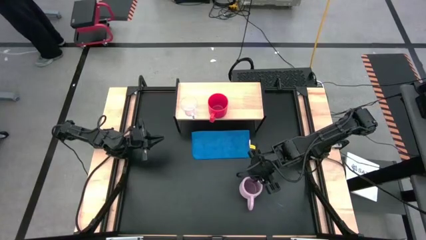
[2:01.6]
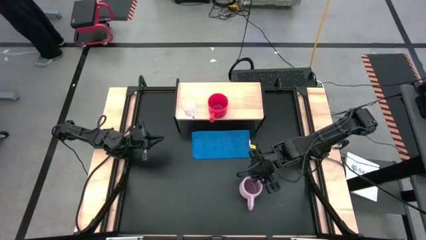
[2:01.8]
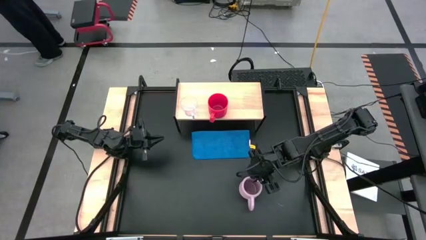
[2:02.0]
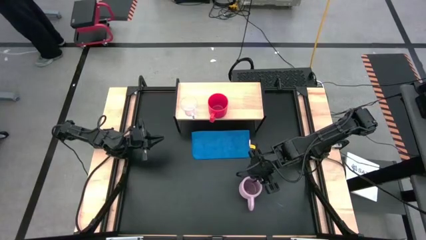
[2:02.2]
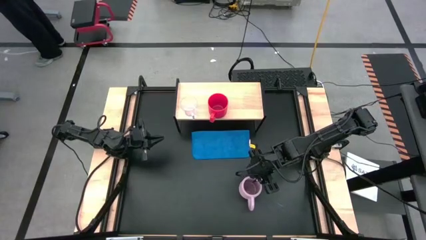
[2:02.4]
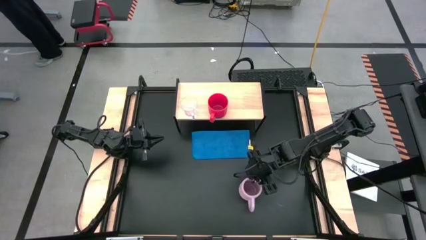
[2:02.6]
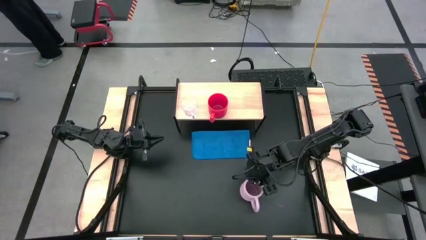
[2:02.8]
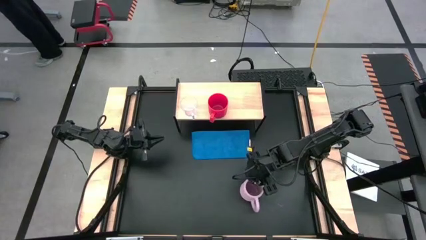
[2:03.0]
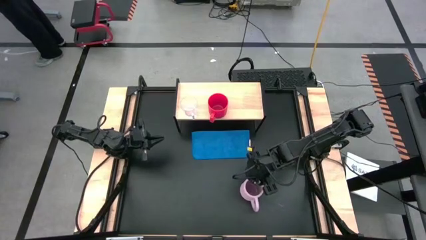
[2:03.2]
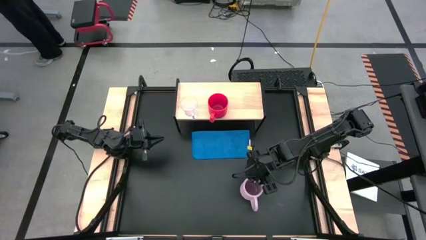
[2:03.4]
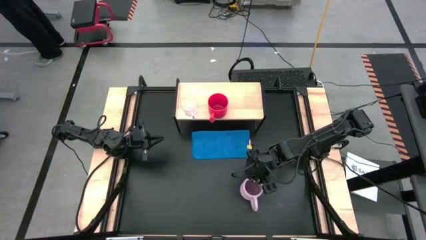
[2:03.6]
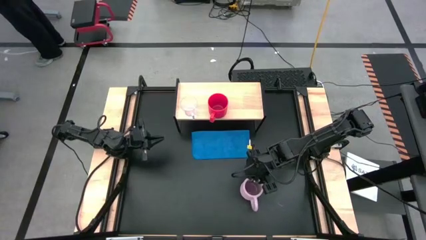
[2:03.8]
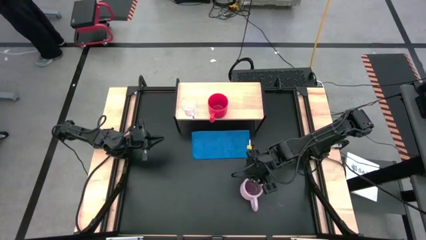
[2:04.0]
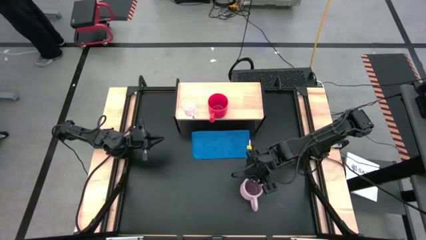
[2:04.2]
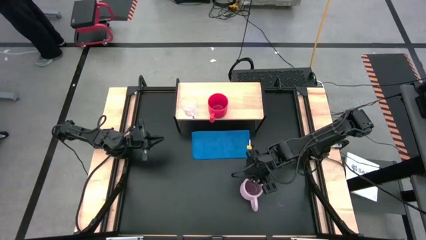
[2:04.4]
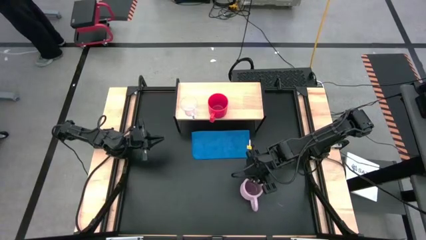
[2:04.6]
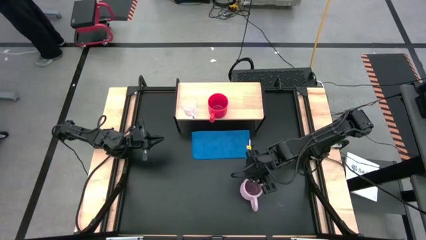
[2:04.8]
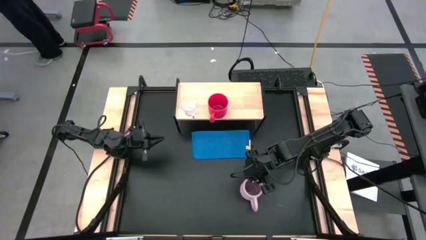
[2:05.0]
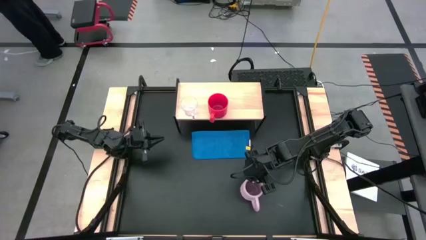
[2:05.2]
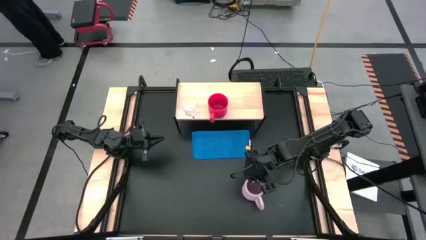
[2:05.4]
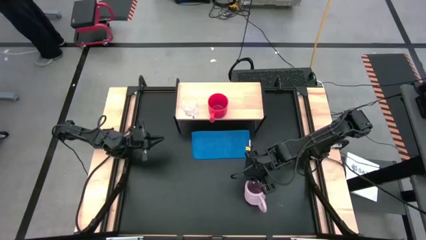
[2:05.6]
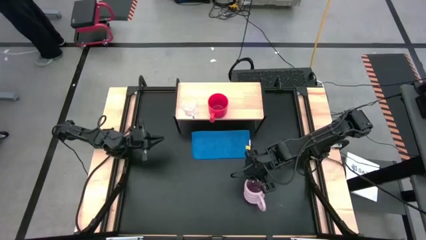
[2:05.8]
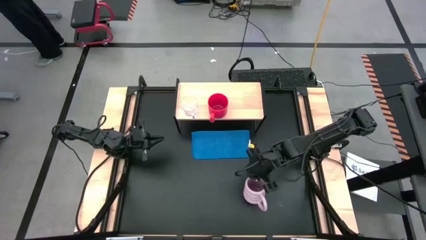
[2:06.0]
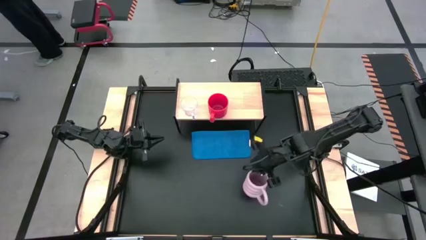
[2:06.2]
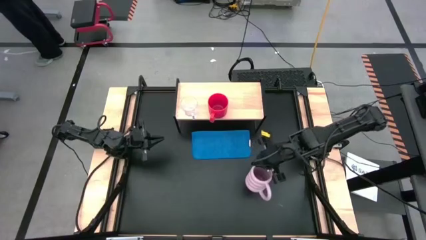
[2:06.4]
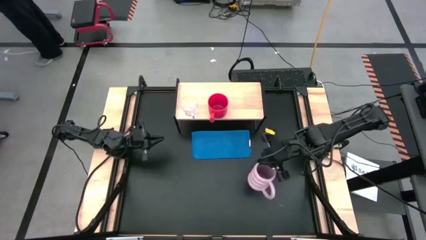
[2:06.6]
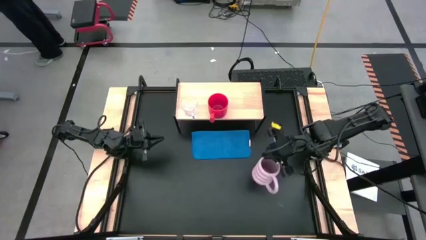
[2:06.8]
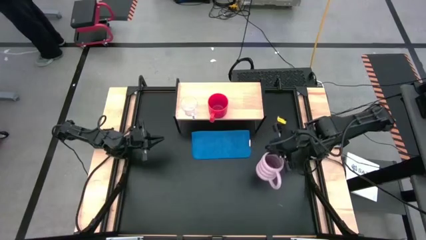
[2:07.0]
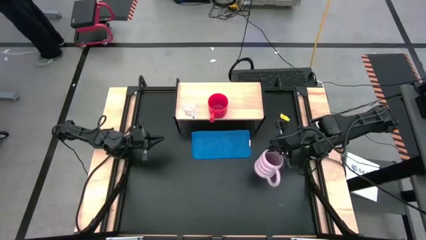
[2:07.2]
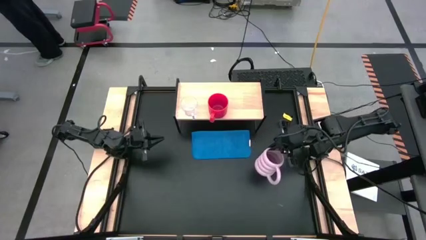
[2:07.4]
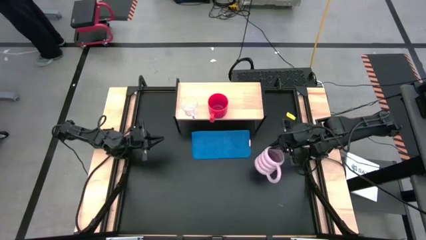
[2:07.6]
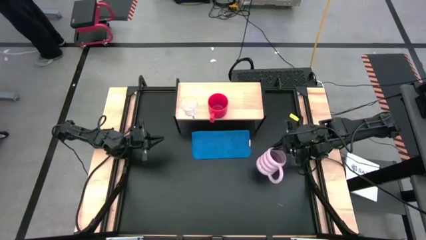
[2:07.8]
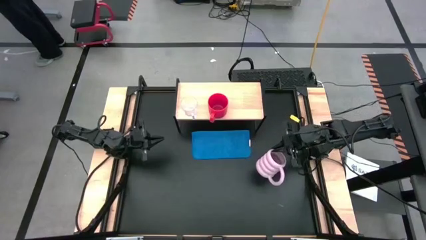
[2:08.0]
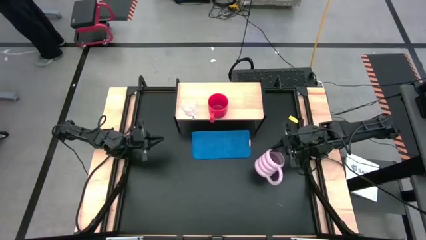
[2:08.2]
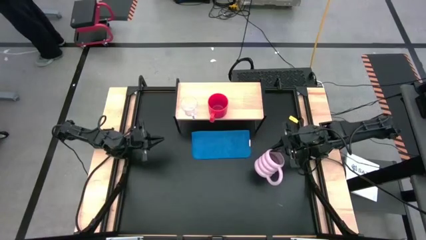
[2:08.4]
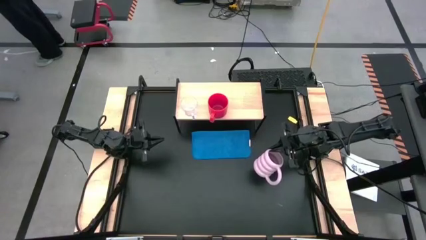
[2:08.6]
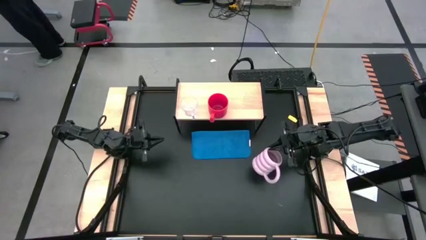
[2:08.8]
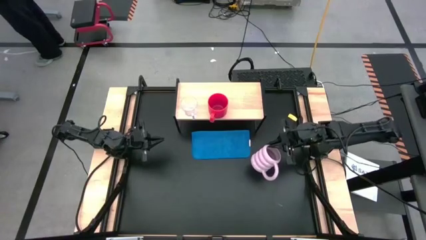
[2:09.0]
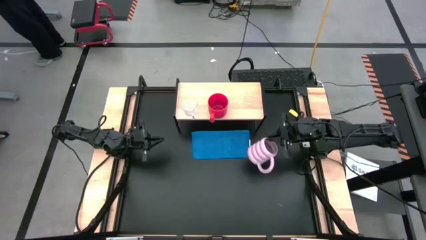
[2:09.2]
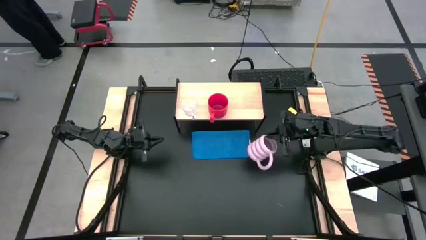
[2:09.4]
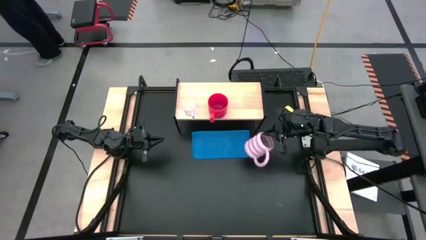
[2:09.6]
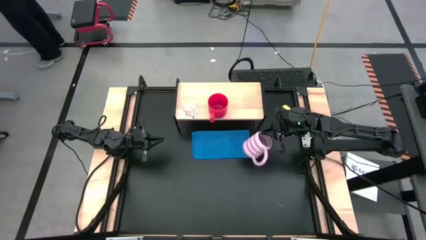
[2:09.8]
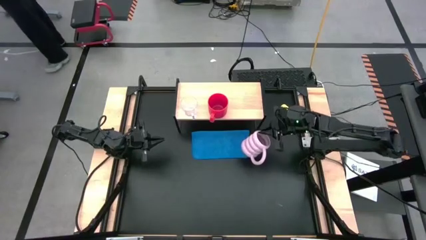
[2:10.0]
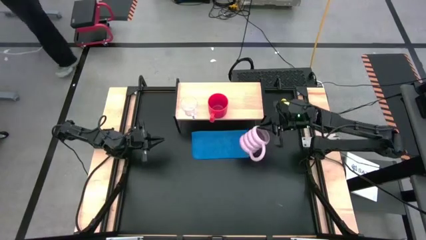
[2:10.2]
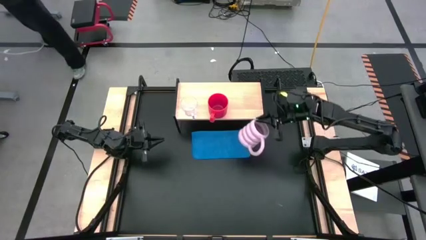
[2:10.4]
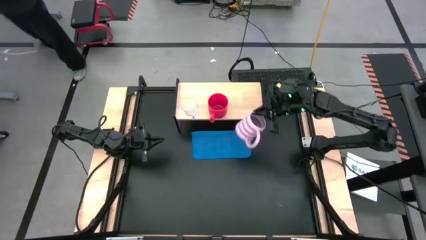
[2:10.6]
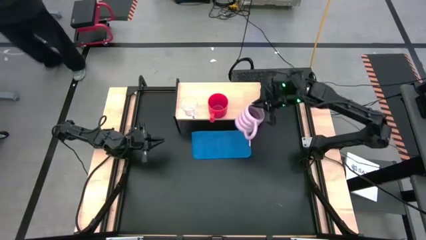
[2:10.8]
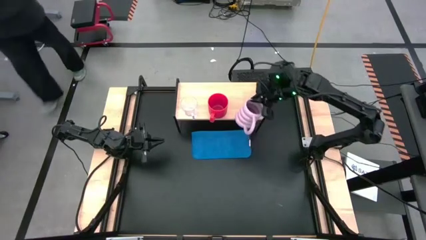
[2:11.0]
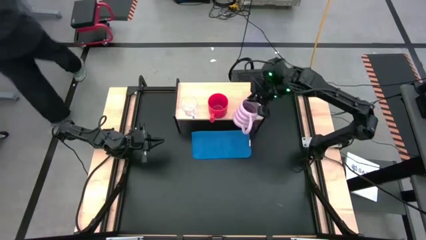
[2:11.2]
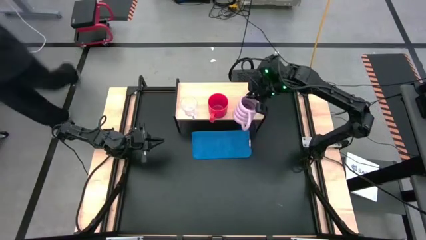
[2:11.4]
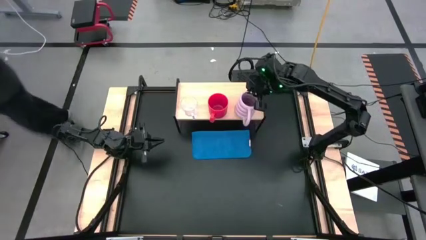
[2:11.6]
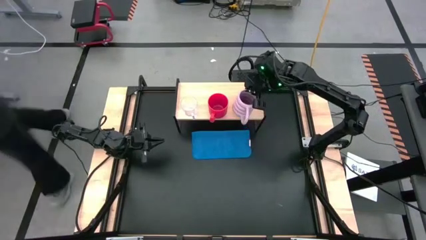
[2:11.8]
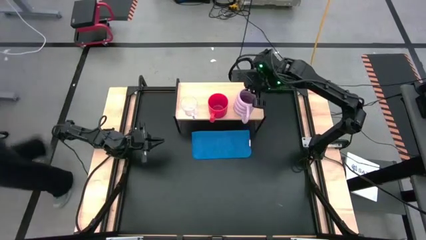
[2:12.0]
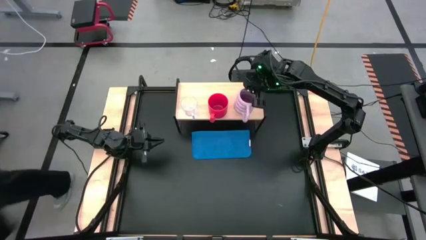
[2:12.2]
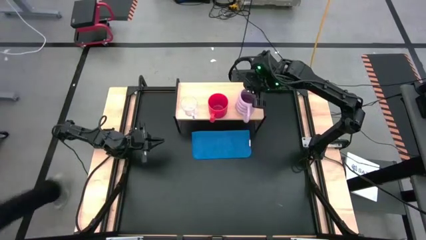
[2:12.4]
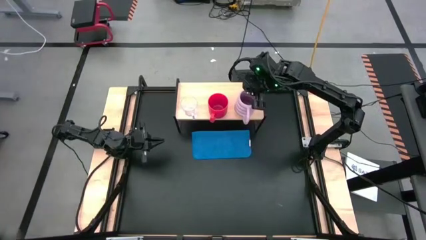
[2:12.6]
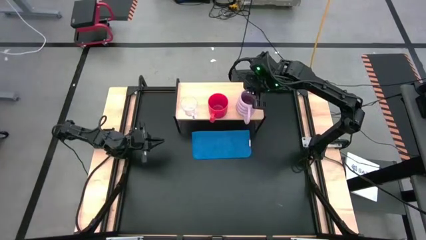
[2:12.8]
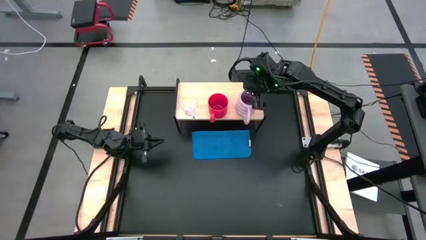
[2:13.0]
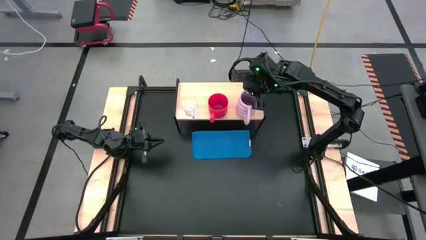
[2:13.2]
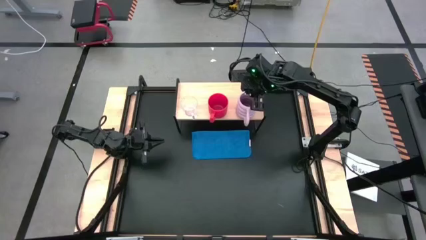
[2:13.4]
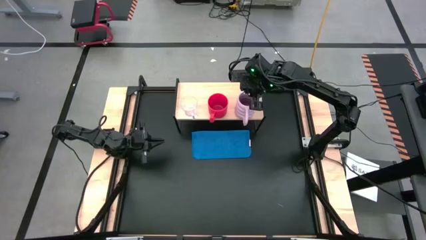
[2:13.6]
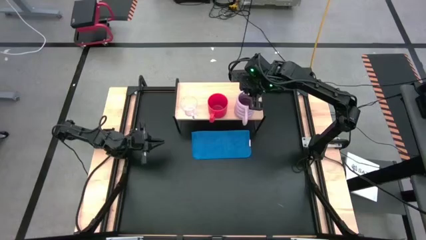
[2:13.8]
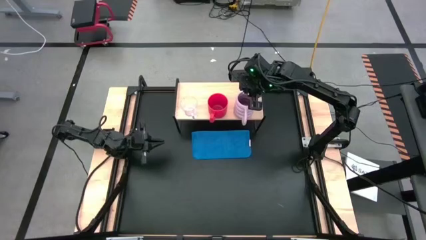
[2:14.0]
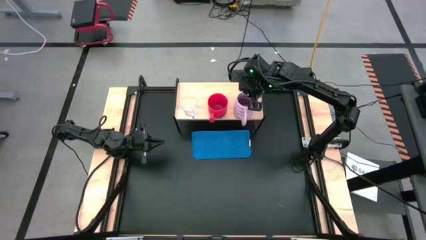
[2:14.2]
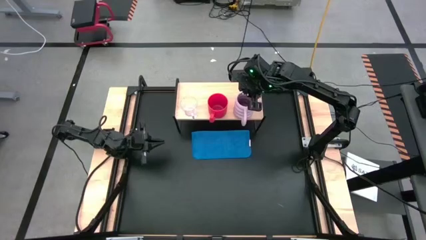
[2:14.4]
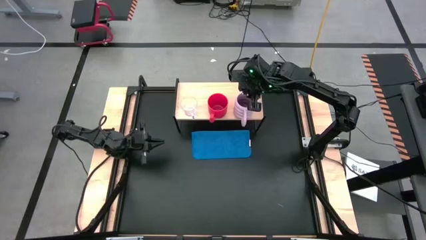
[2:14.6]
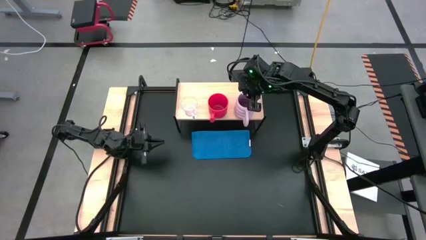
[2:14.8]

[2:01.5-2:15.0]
Task: Stack small to large cups/mugs on shelf
Put the purple mug on the shelf

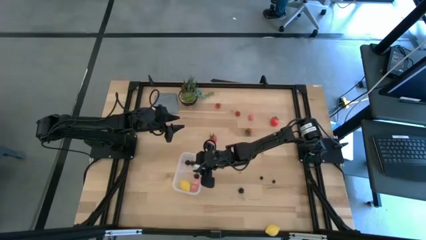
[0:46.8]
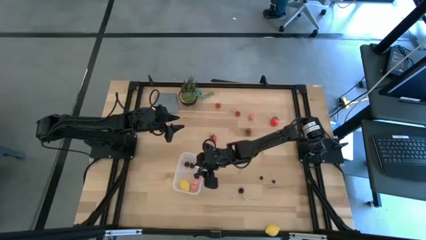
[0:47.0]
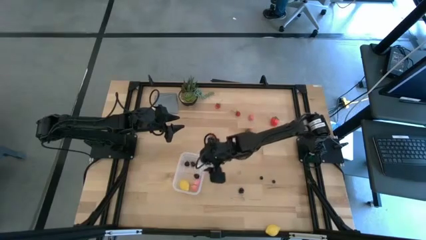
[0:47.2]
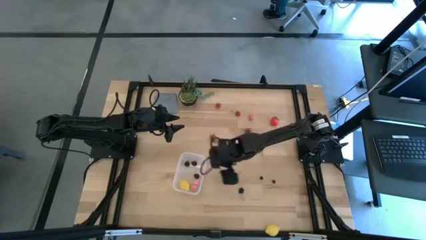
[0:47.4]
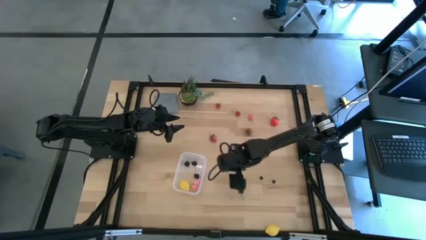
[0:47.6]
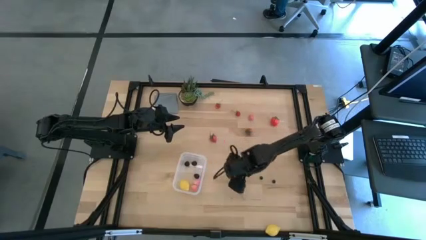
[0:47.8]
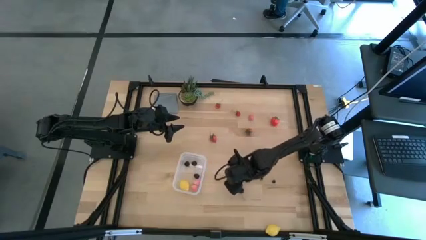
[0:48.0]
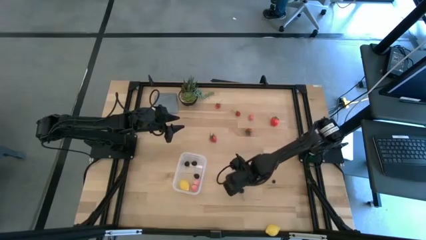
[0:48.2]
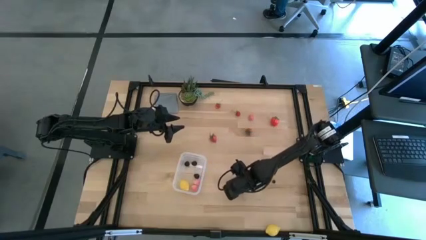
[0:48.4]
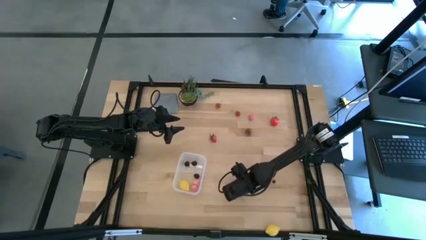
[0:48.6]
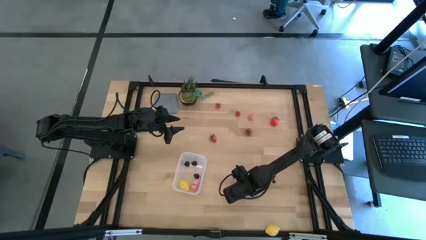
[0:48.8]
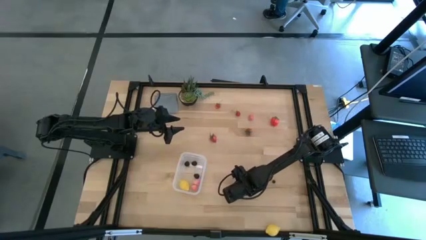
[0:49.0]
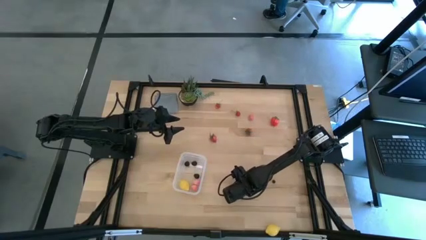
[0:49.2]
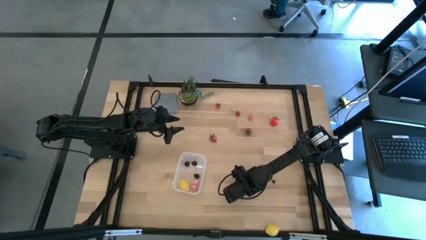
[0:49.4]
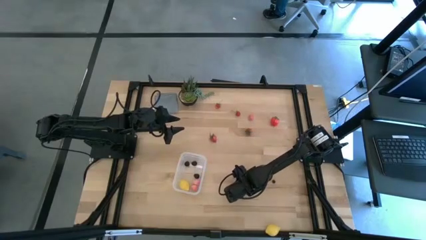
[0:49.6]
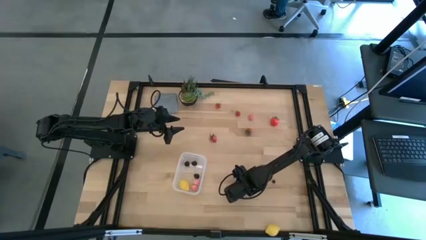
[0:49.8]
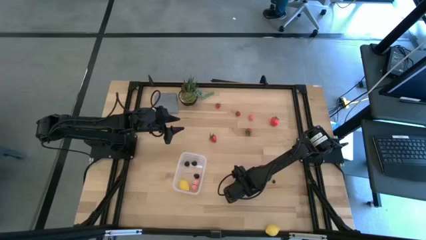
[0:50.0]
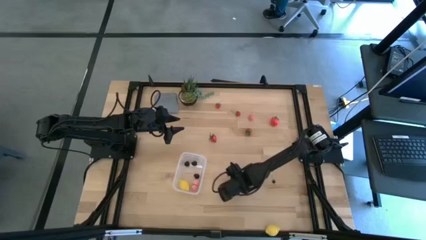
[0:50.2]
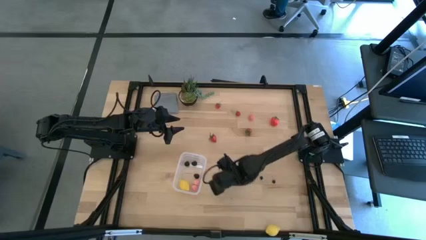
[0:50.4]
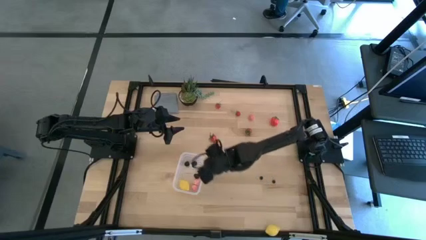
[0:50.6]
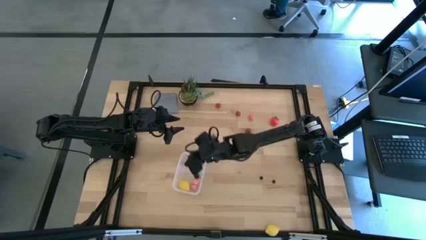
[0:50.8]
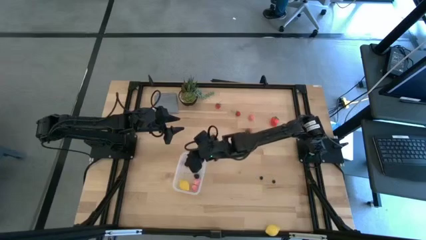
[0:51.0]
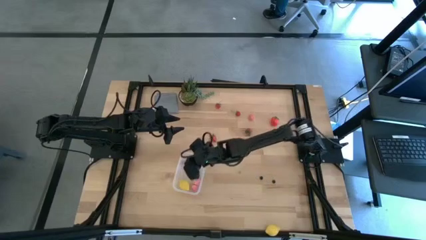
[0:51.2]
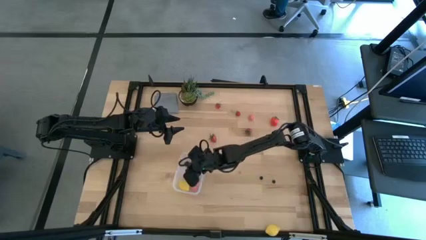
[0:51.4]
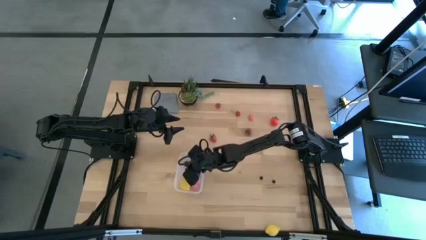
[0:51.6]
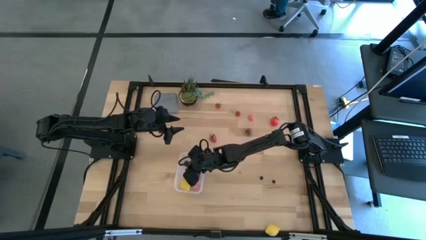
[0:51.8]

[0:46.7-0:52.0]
Task: Pick and placing Produce into tupperware
Put the black cherry into the transparent bin
